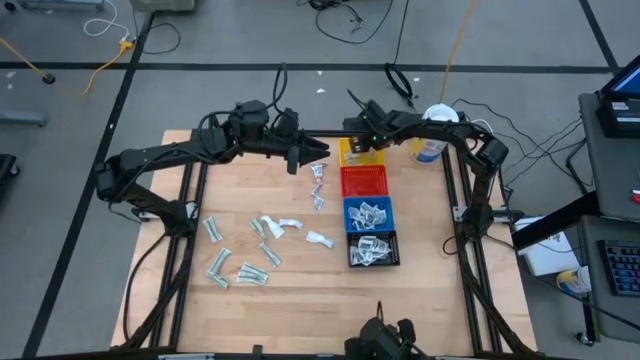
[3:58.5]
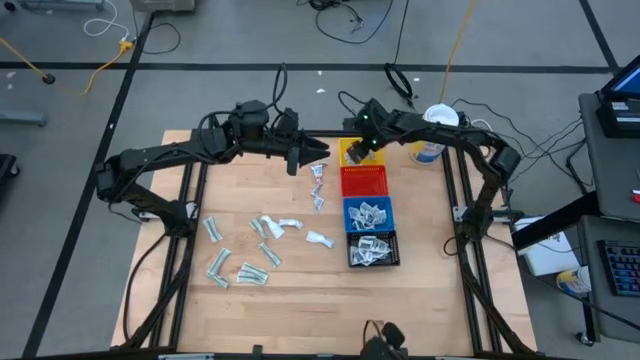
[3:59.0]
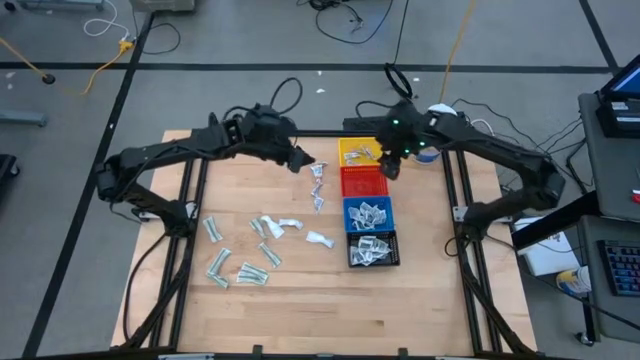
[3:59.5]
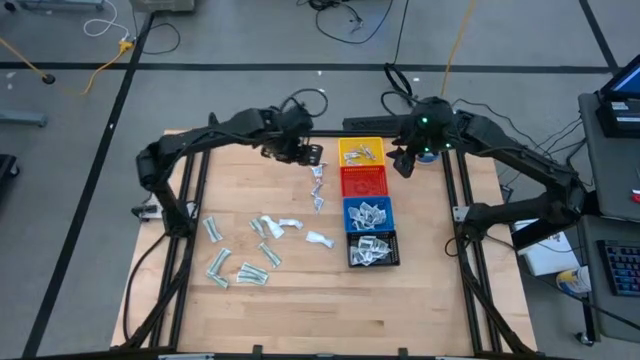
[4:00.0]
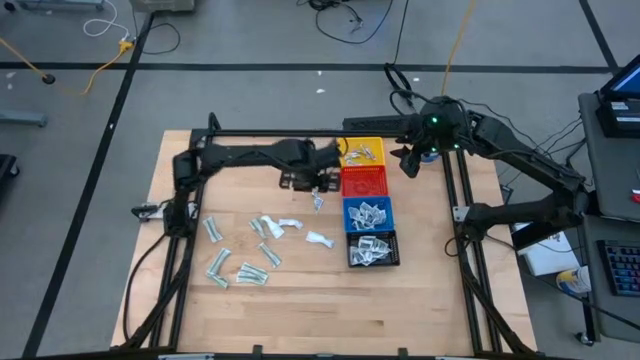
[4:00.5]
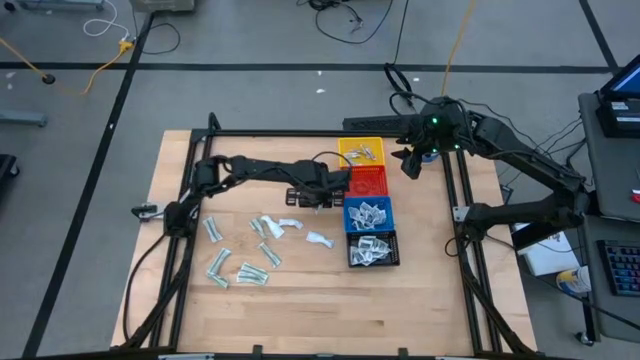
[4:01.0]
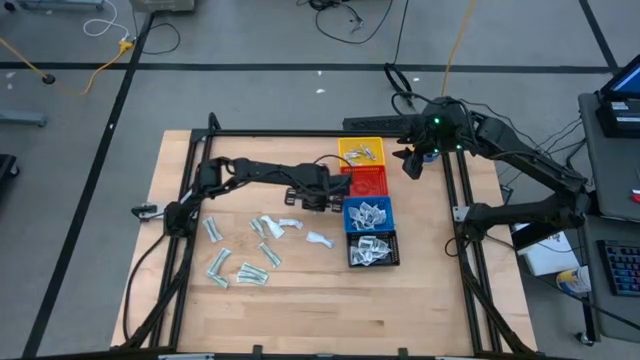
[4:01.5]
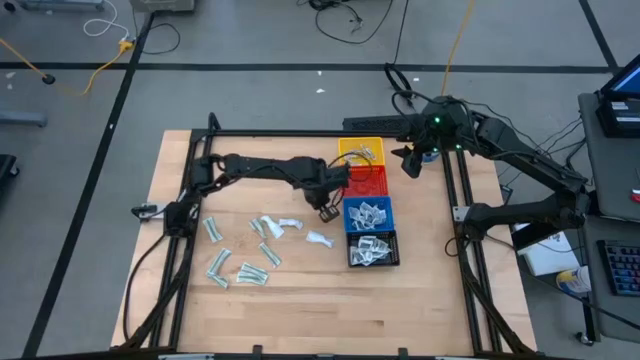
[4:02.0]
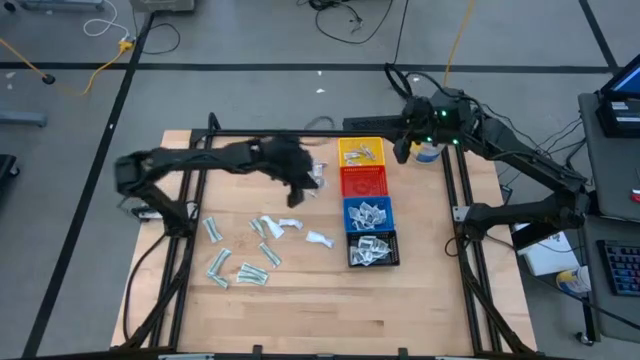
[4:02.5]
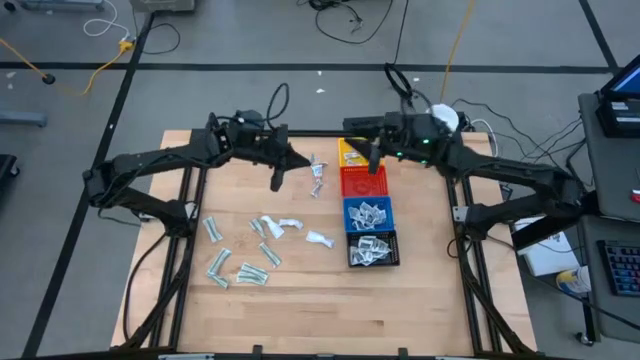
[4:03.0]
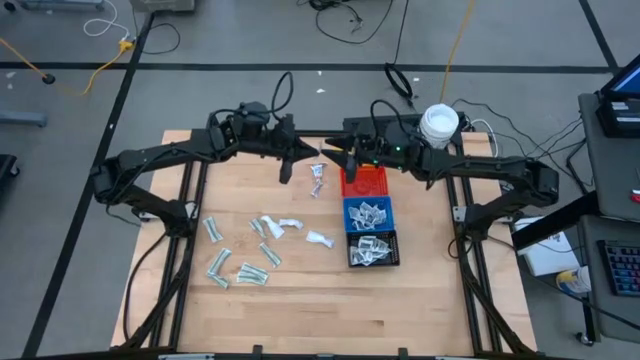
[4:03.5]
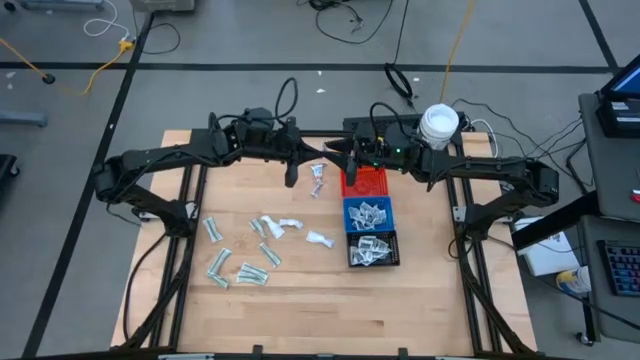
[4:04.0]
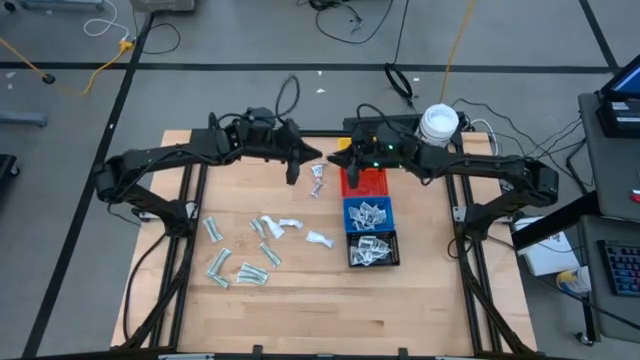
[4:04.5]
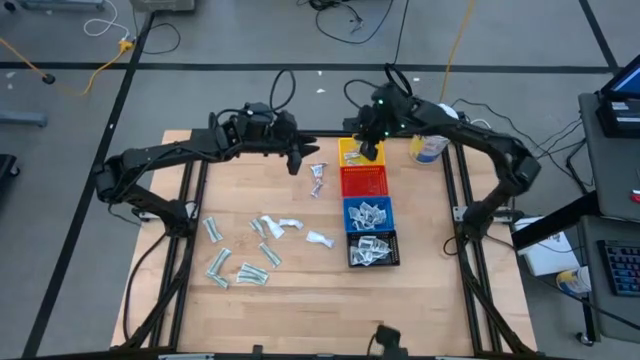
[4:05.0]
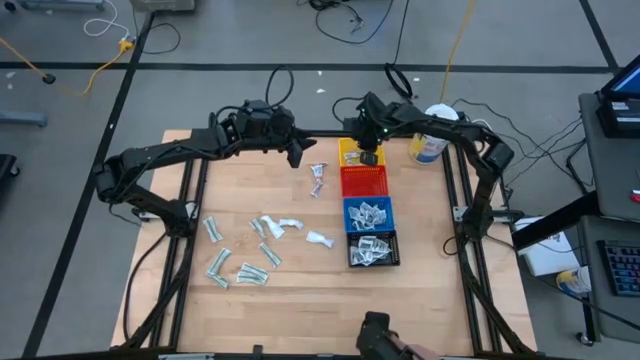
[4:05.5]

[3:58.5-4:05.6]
Task: Pick & Place First Aid Supplies
Put the orange ointment pack into the yellow bin

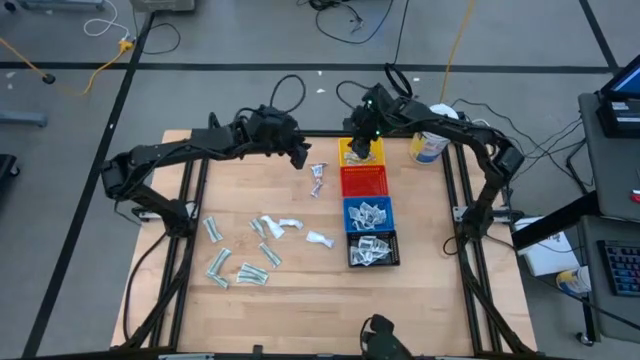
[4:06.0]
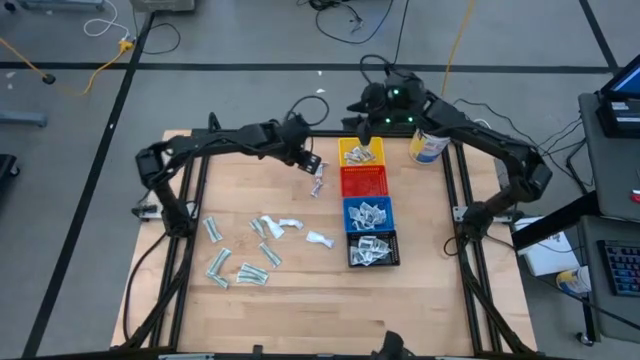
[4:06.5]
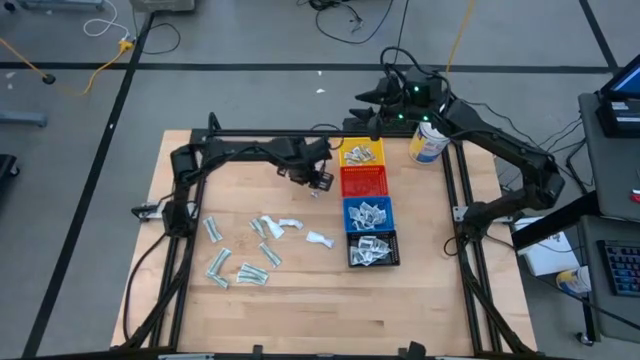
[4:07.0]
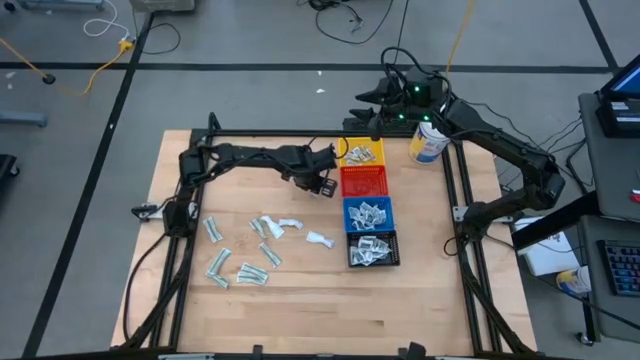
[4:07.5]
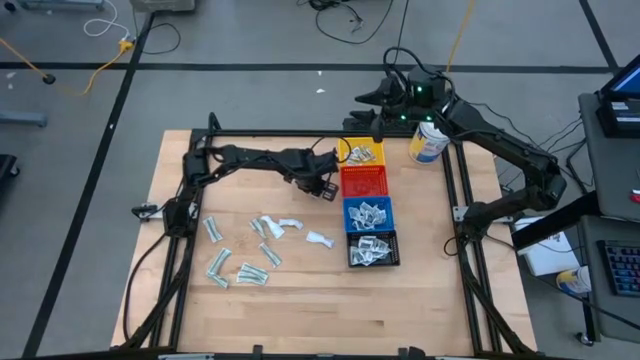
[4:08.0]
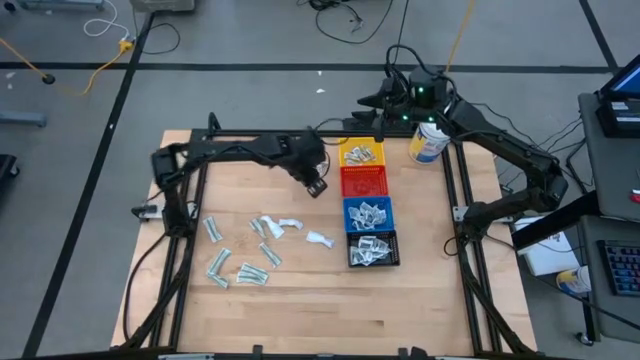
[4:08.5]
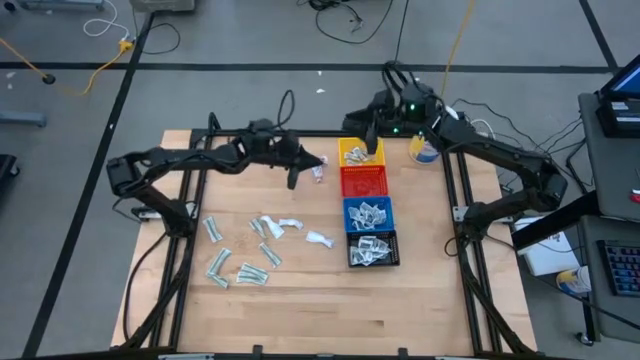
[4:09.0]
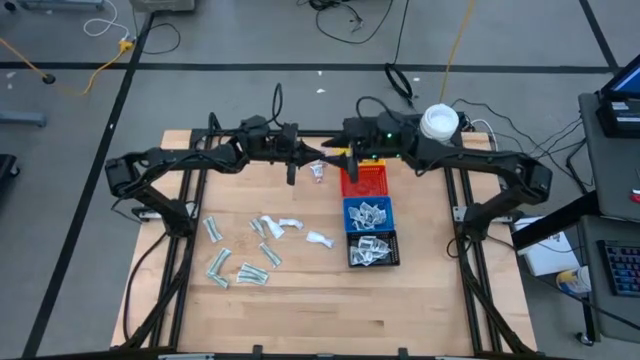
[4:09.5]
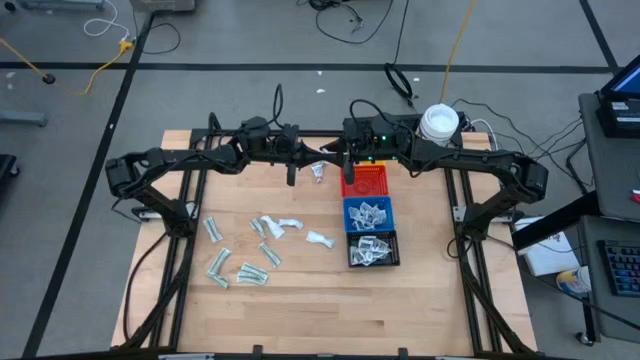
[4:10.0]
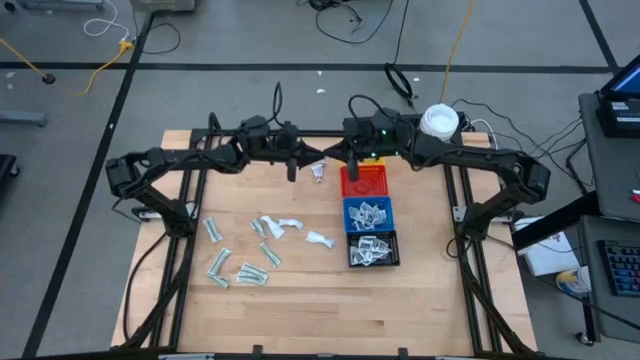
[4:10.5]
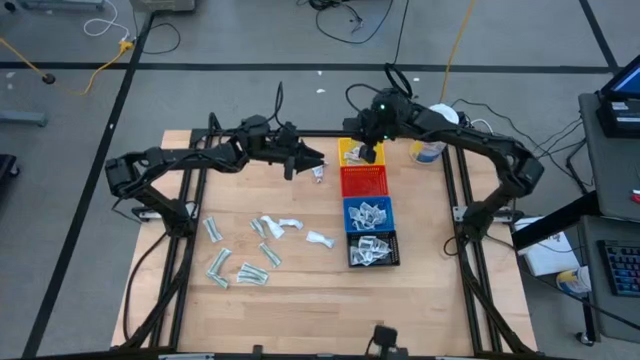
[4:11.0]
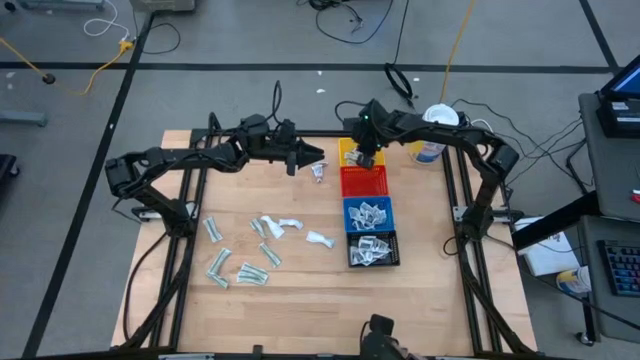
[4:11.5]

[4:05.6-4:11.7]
Put the orange ointment pack into the yellow bin

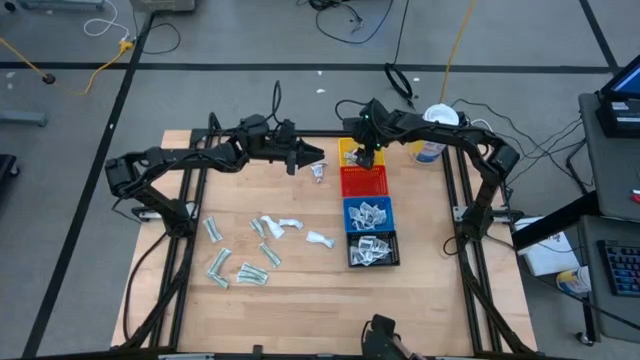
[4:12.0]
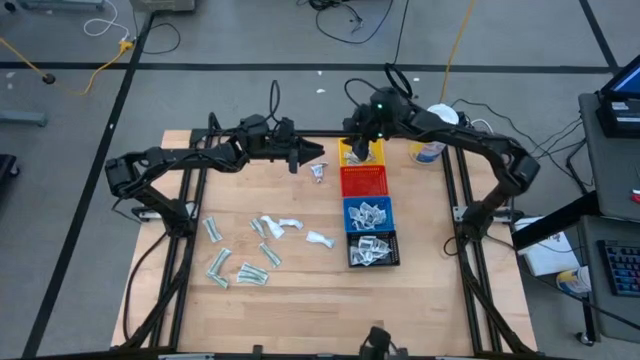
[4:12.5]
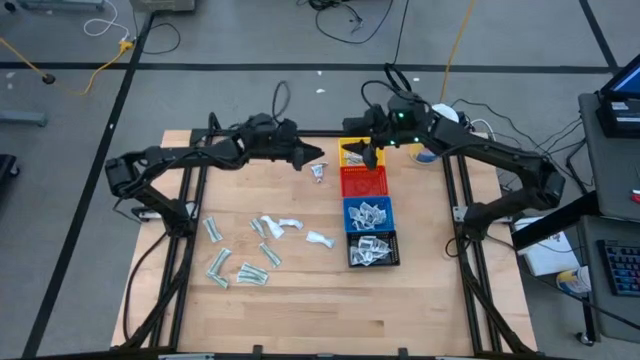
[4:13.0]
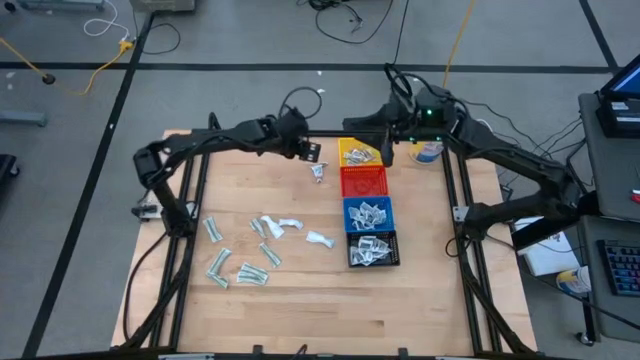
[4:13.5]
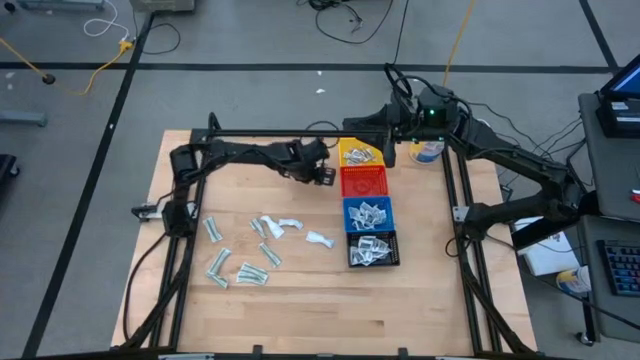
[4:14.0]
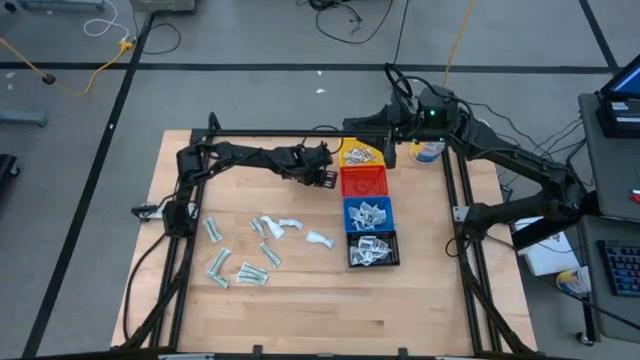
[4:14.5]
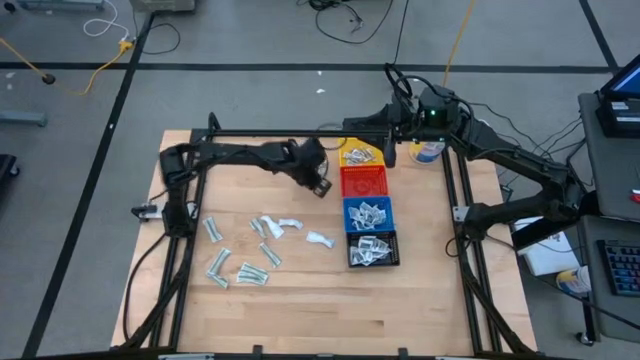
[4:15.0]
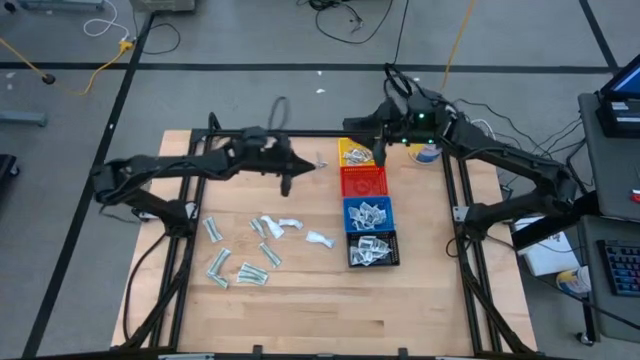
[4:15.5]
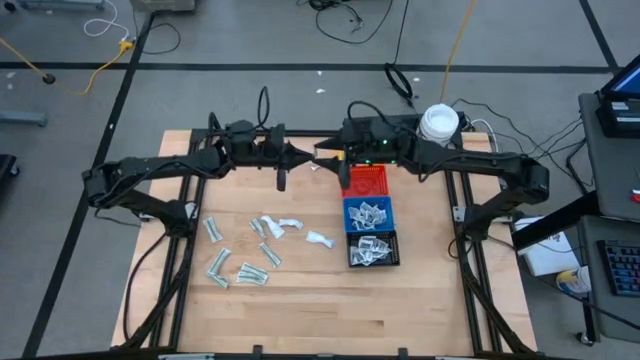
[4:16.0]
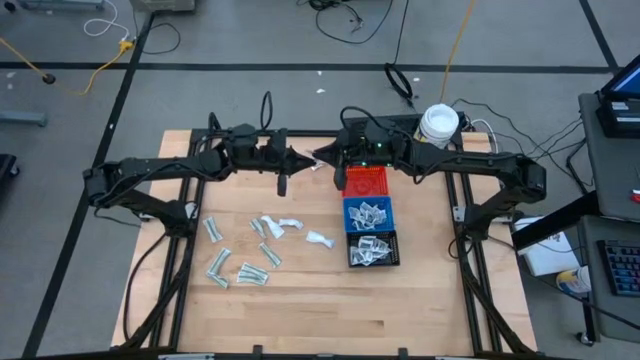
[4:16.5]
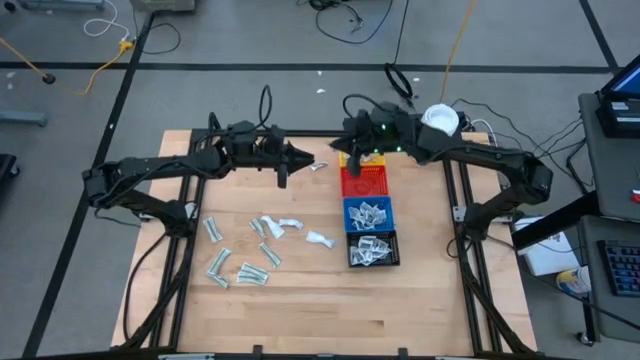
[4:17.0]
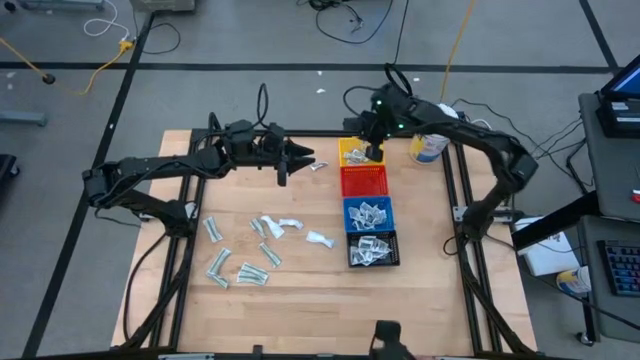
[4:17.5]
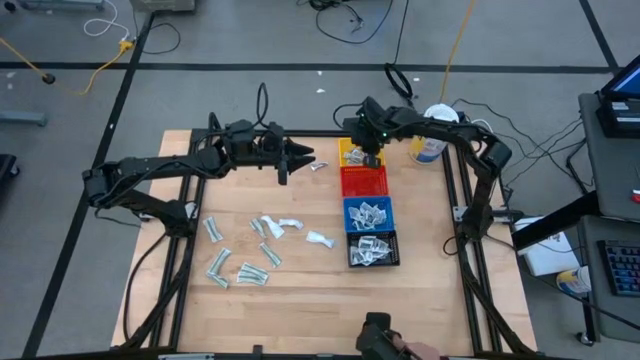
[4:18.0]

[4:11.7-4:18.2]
Put the orange ointment pack into the yellow bin

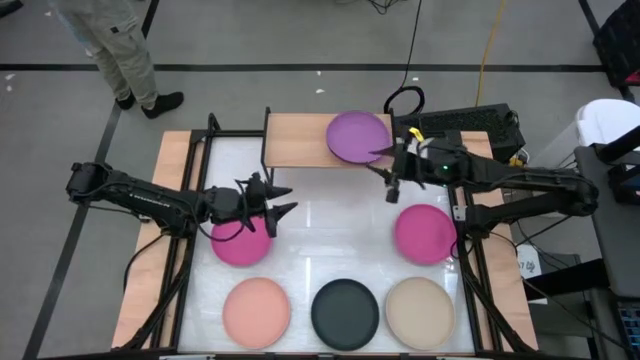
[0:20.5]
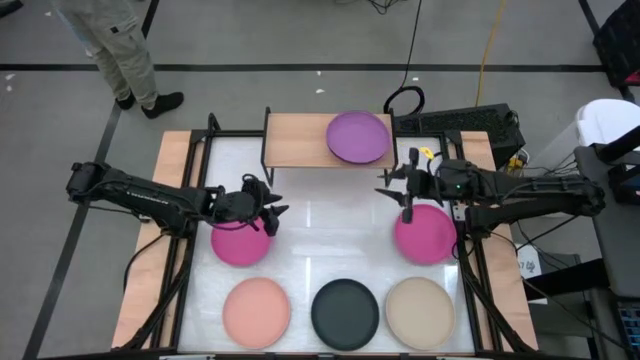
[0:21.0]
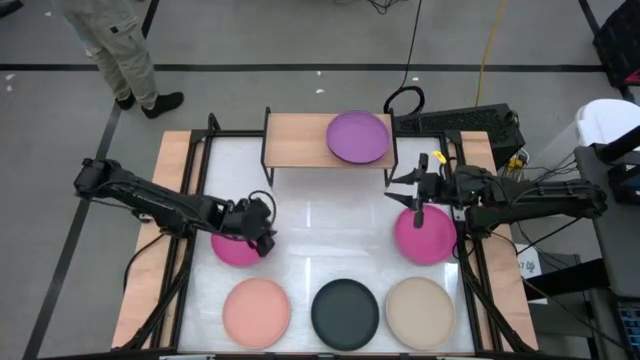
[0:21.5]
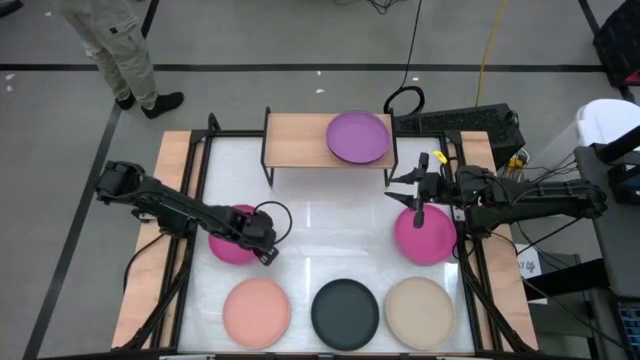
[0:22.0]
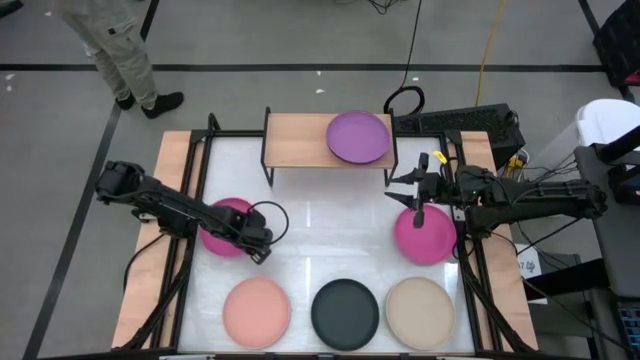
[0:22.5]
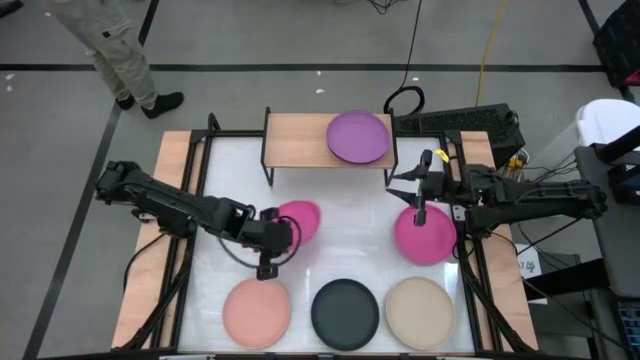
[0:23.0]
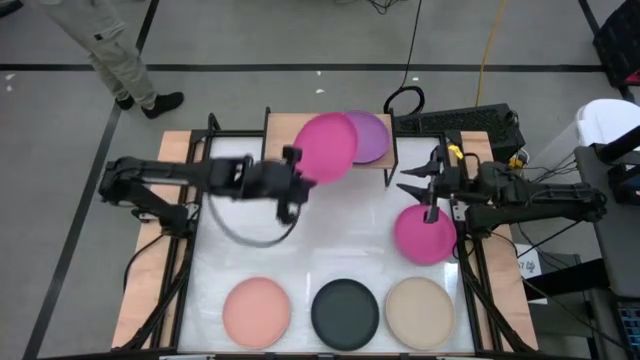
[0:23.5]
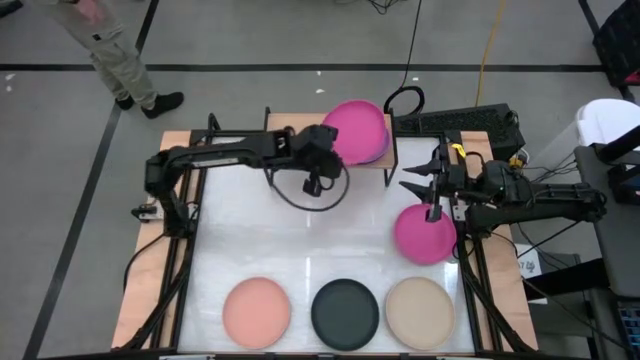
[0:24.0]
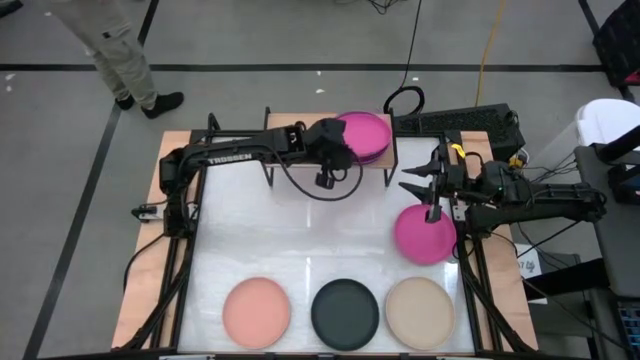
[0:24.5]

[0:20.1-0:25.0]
Task: Place and stack plates onto a shelf
Stack the left pink plate on top of the purple plate on the shelf
